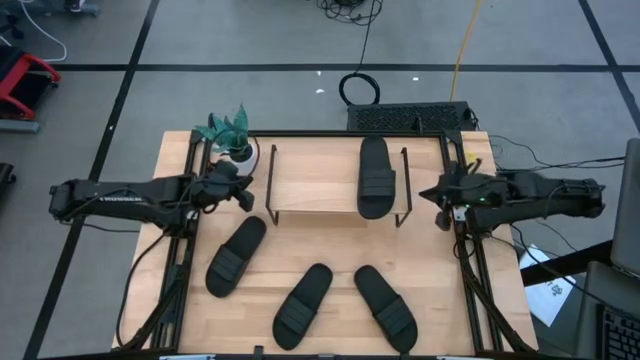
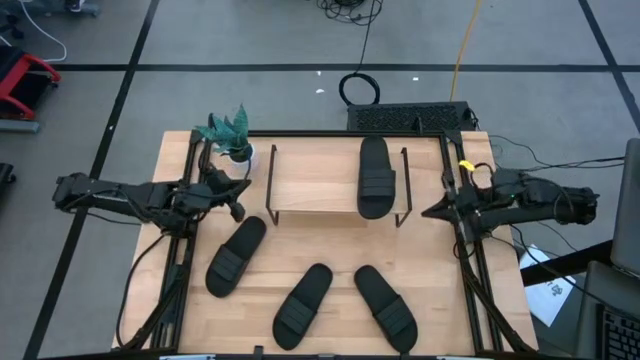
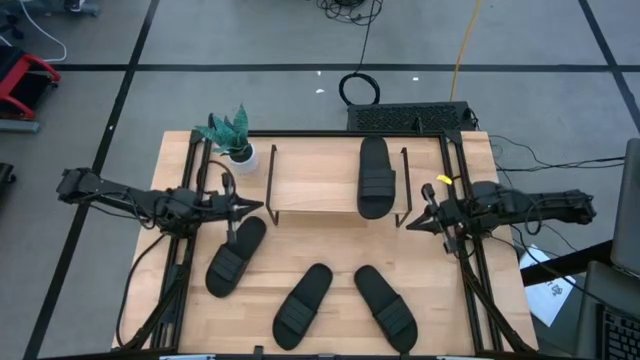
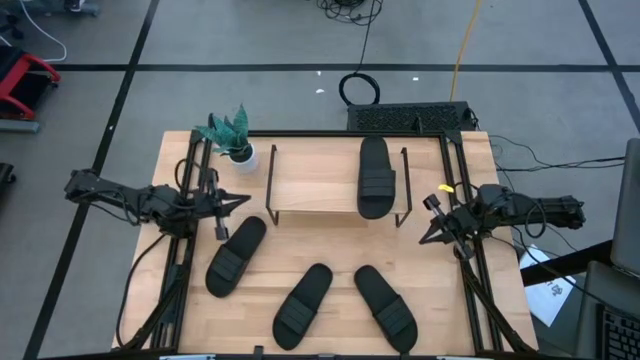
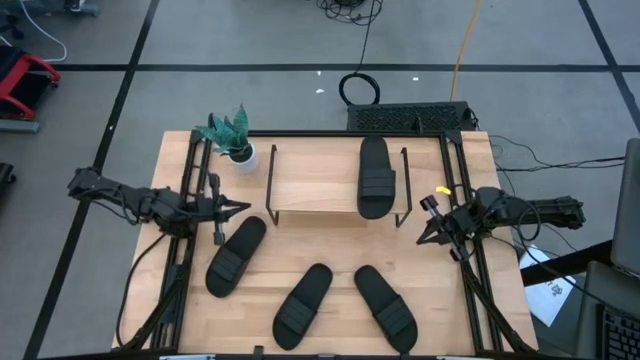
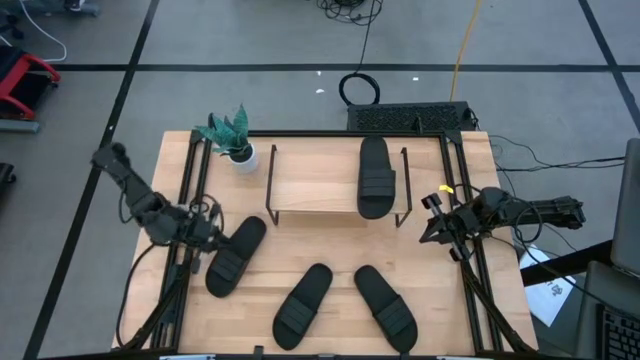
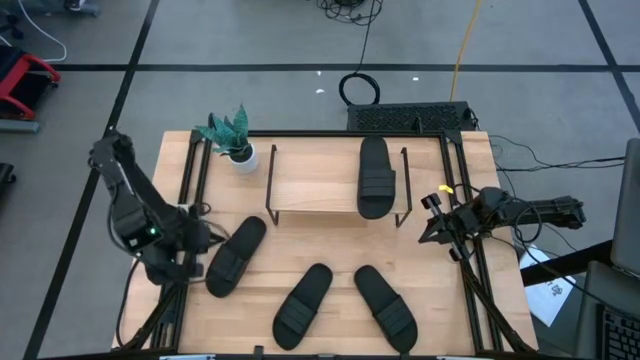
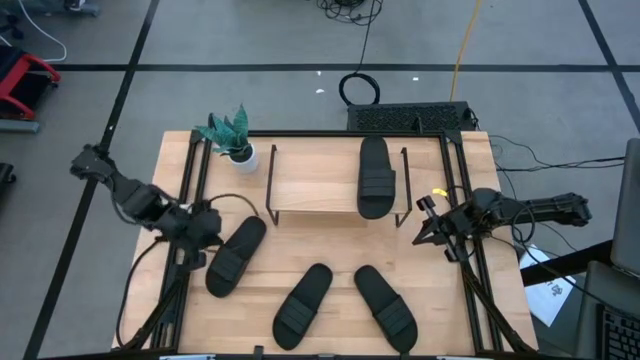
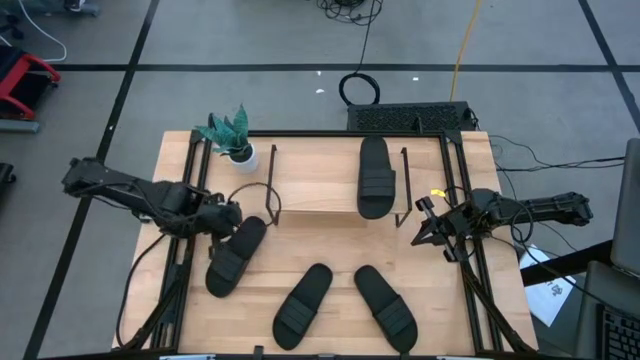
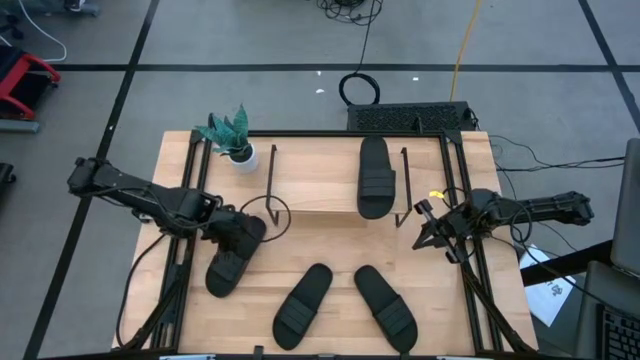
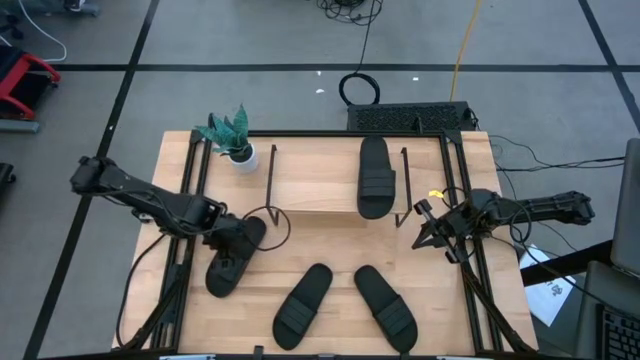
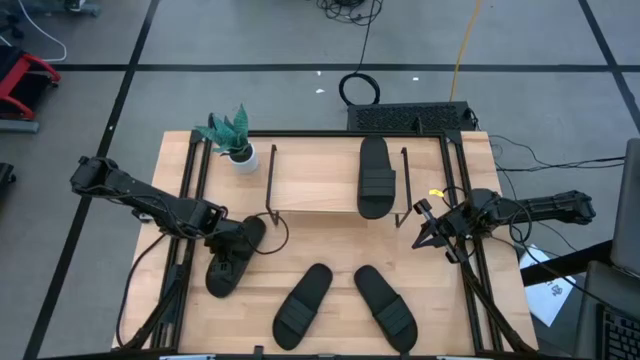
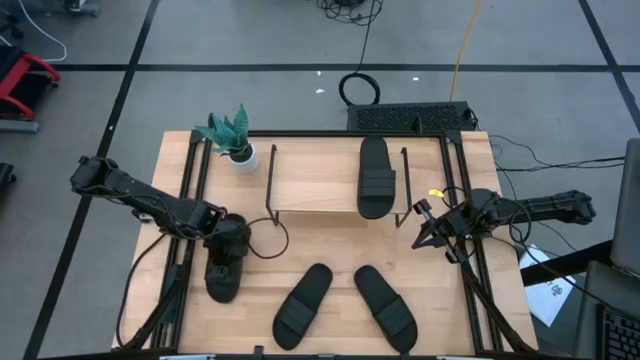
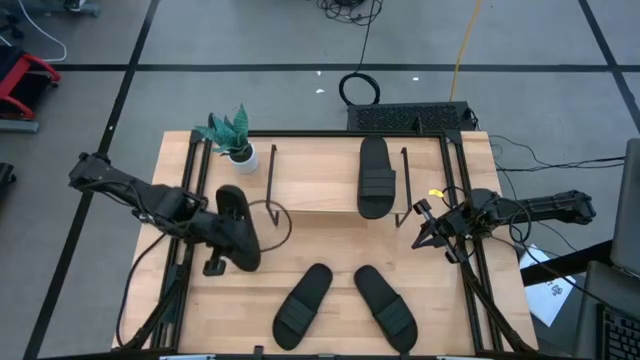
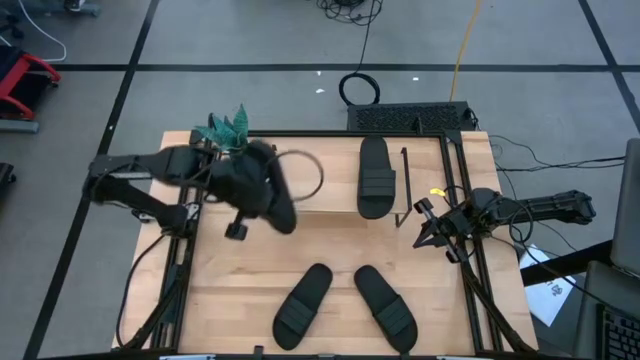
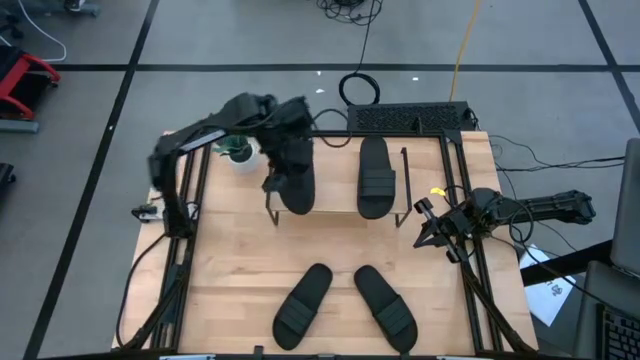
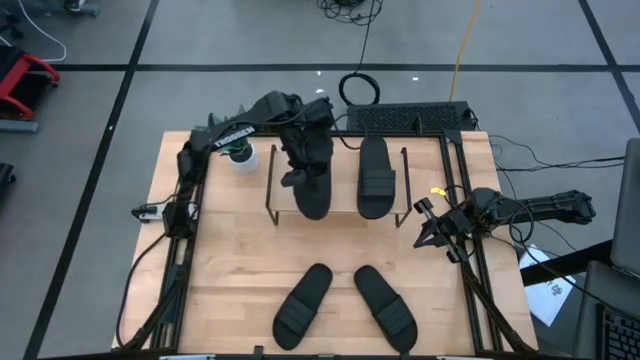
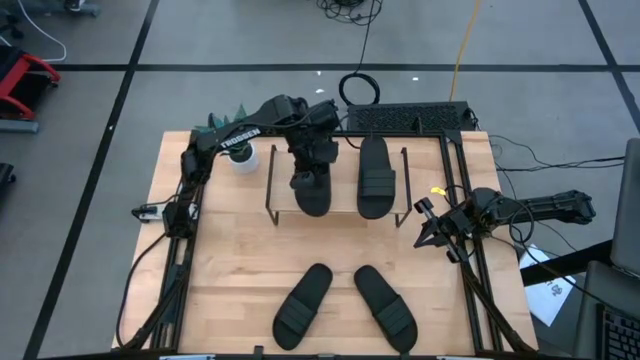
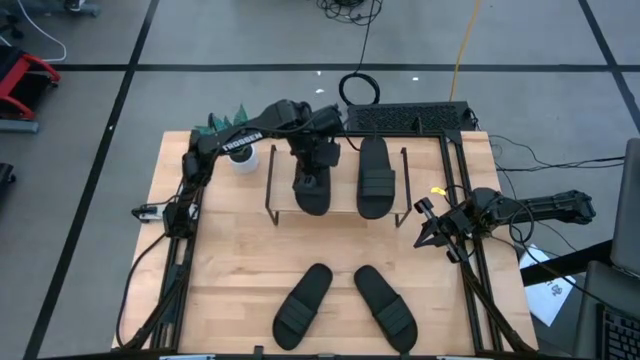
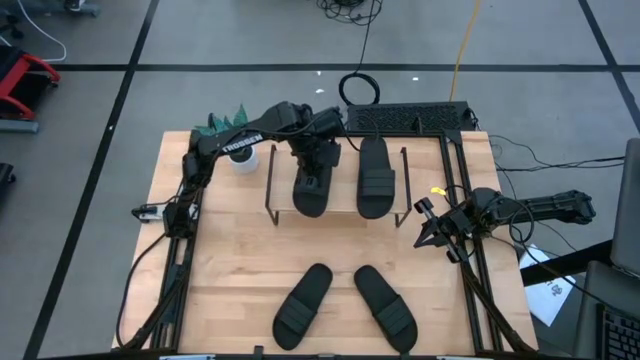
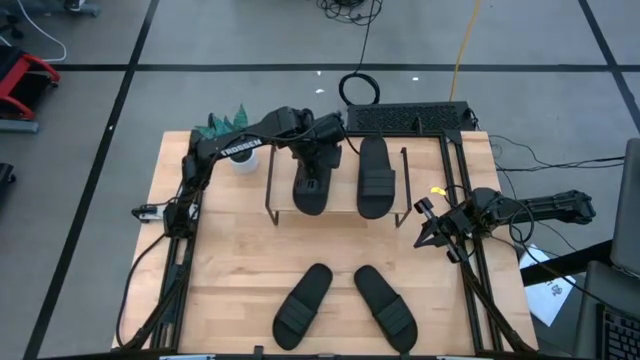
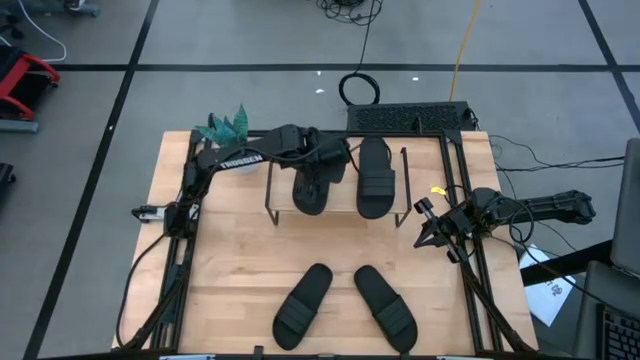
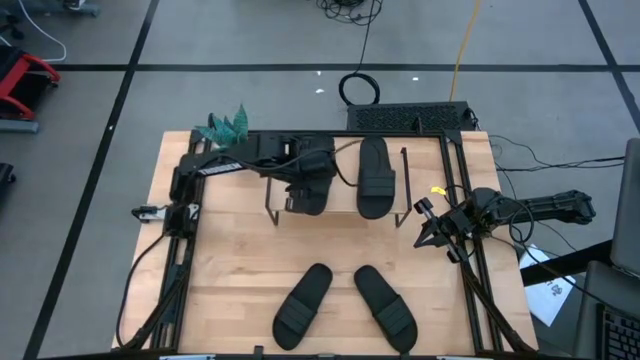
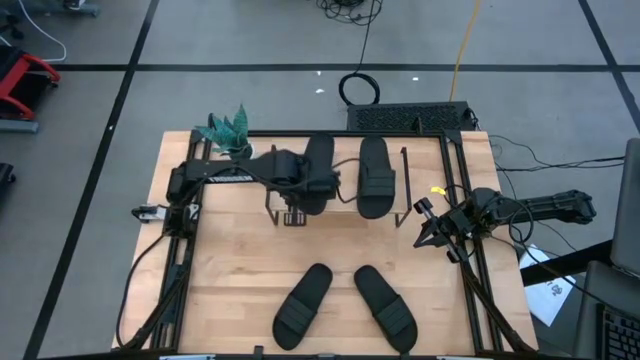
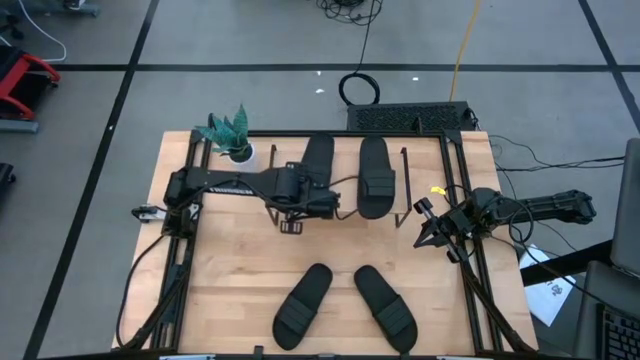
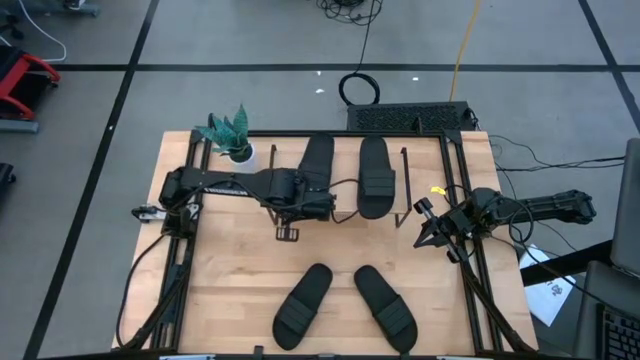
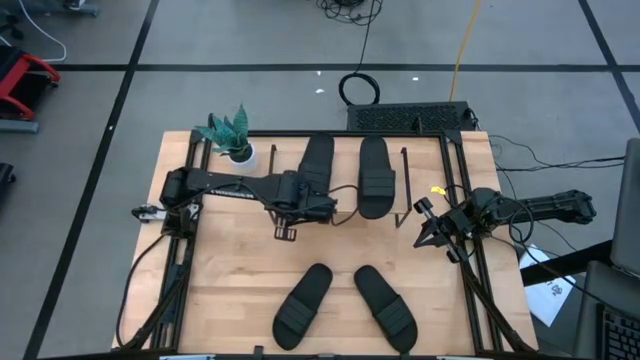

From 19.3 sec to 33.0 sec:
Task: Pick and place slides into the shelf
Put the black slipper on the shelf

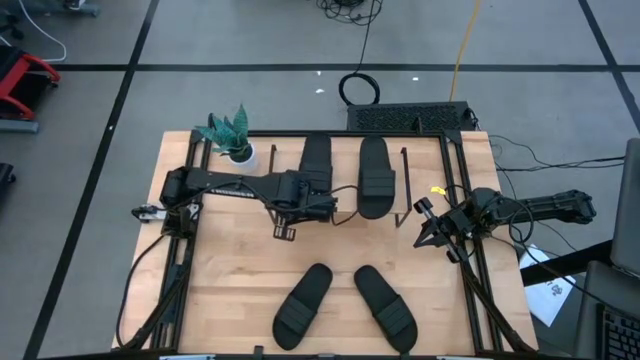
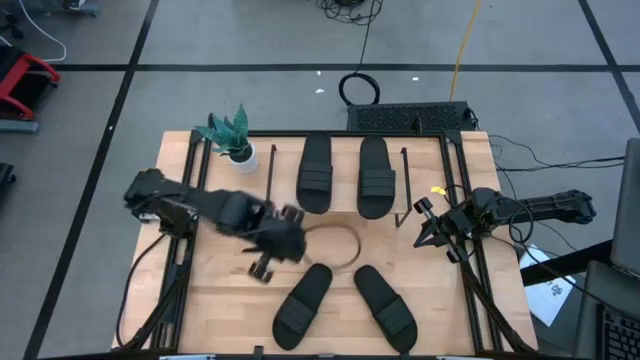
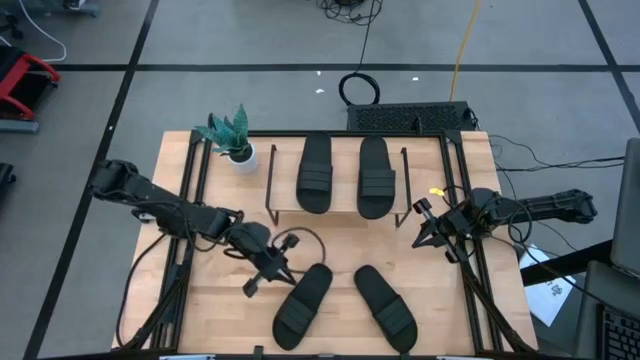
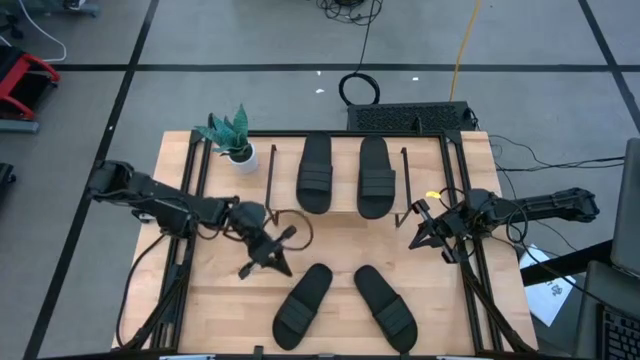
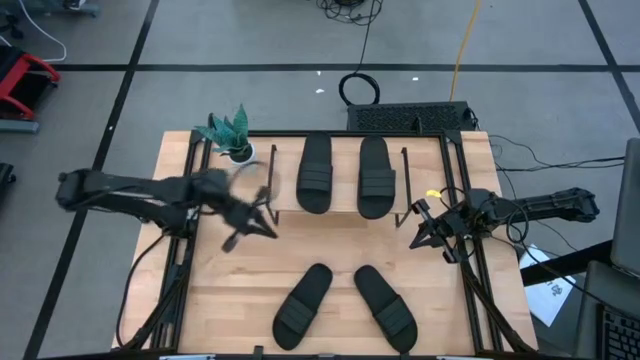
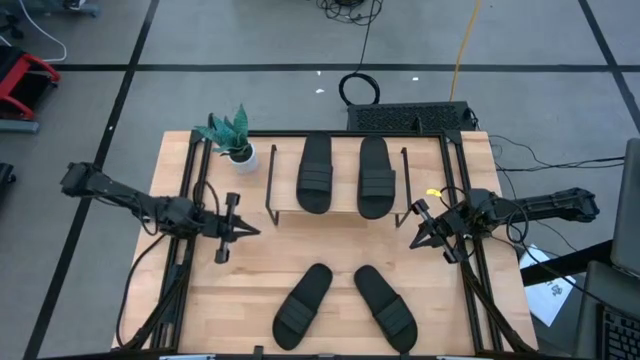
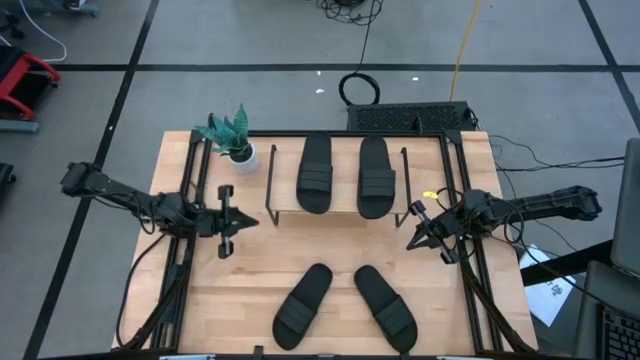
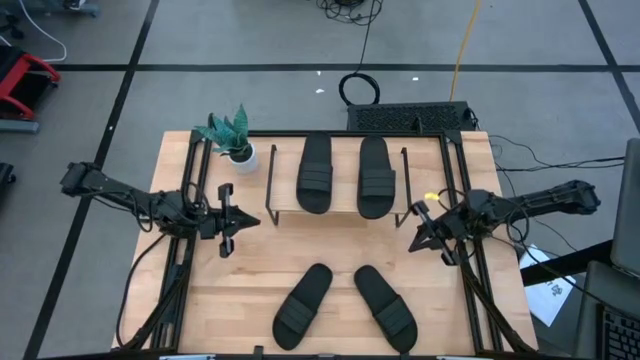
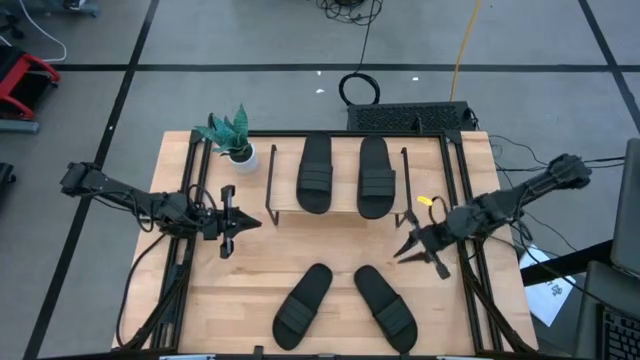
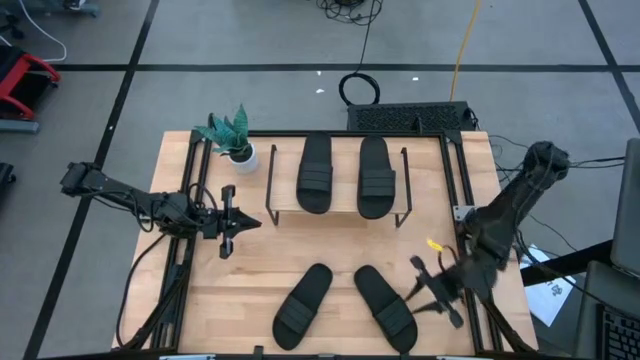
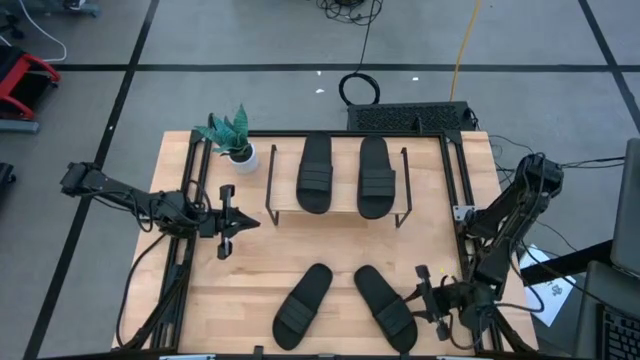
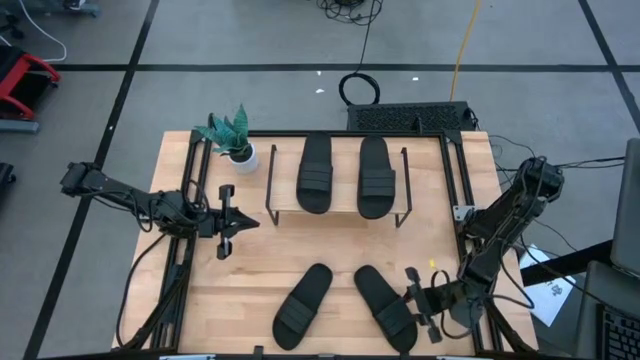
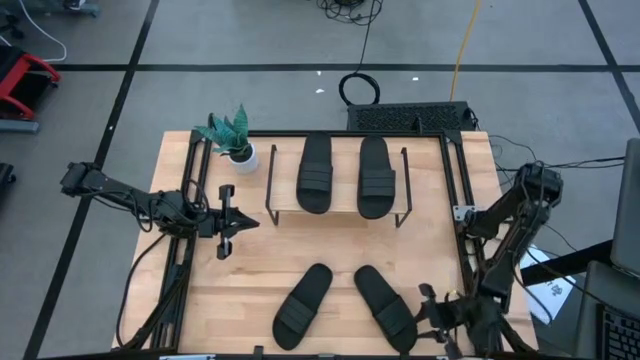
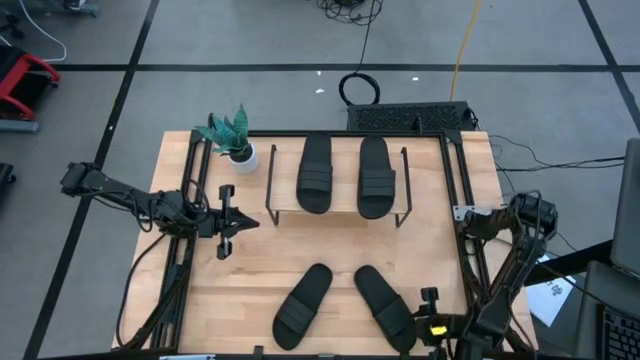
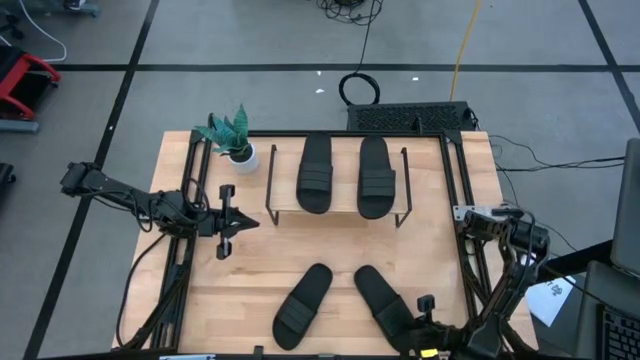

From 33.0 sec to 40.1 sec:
Put the black slipper under the shelf
